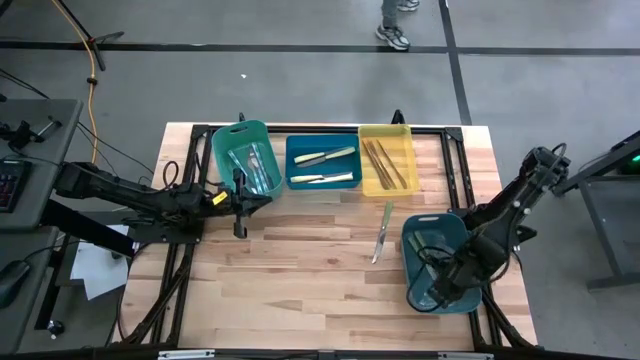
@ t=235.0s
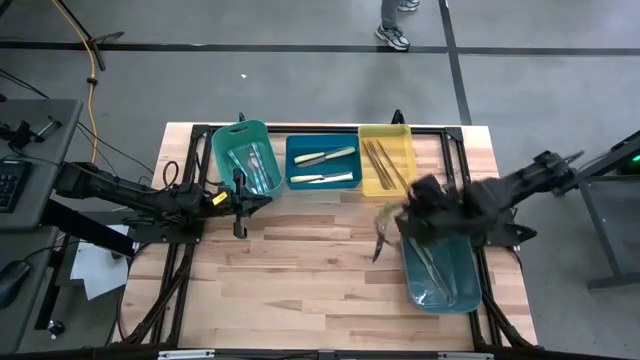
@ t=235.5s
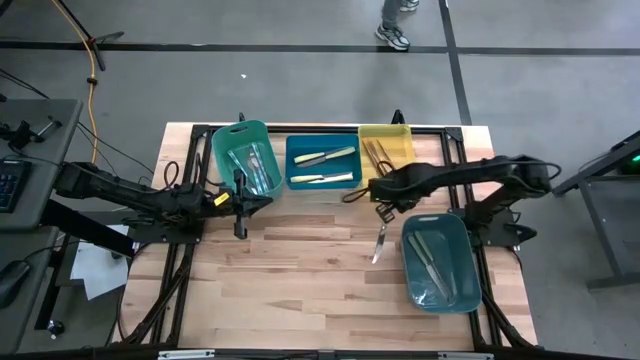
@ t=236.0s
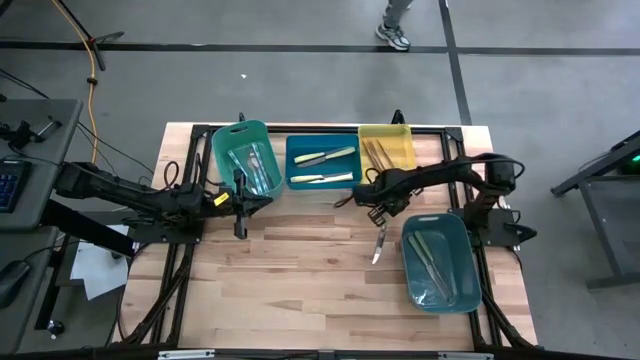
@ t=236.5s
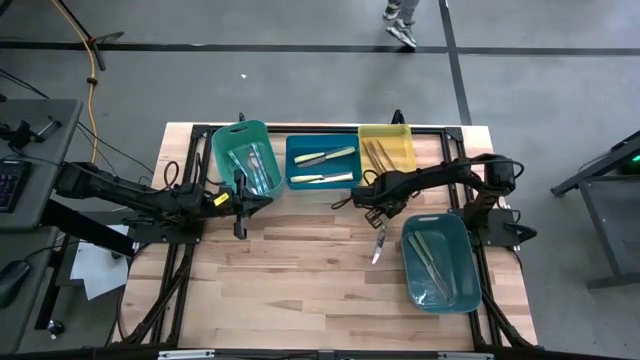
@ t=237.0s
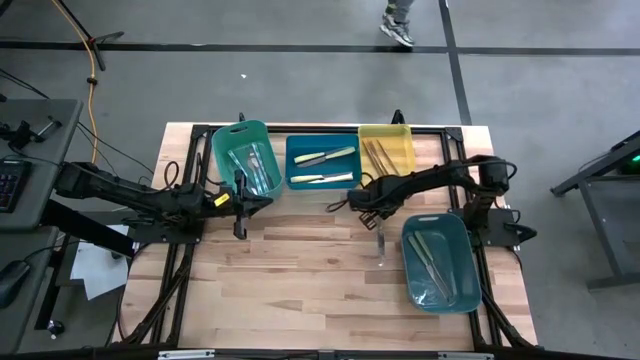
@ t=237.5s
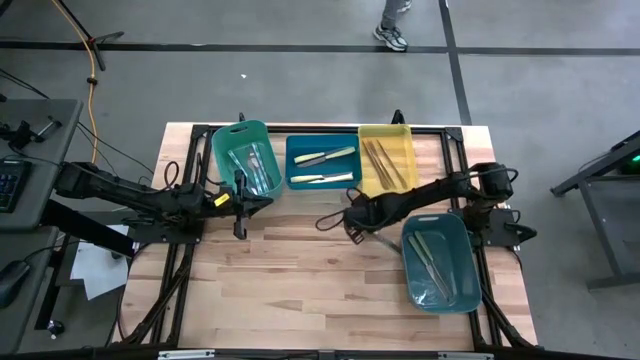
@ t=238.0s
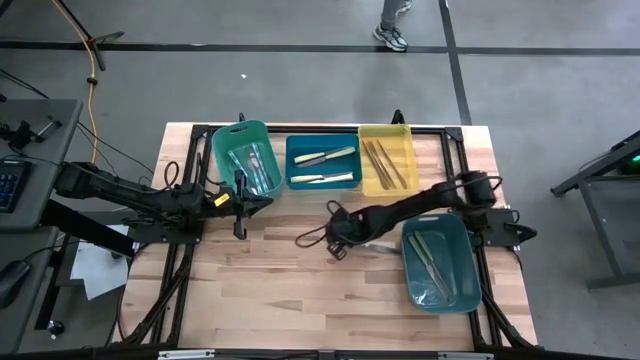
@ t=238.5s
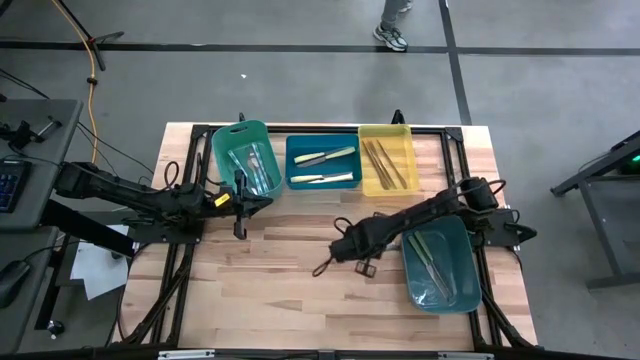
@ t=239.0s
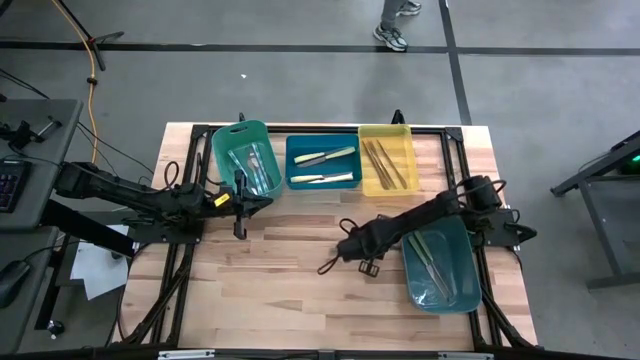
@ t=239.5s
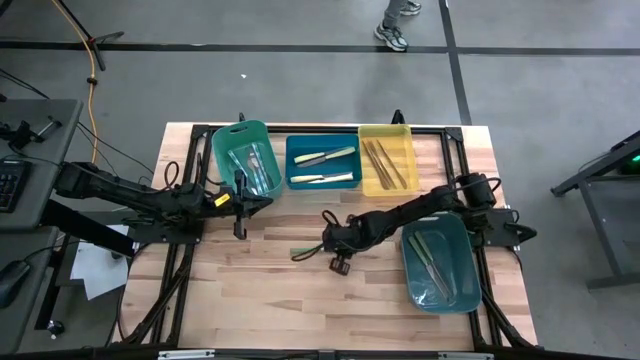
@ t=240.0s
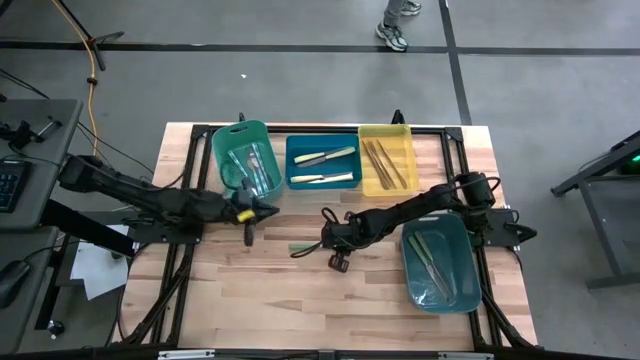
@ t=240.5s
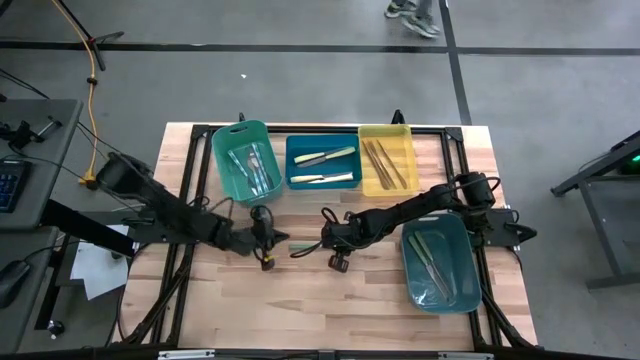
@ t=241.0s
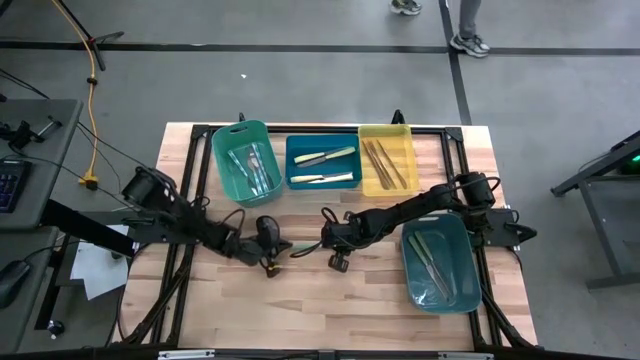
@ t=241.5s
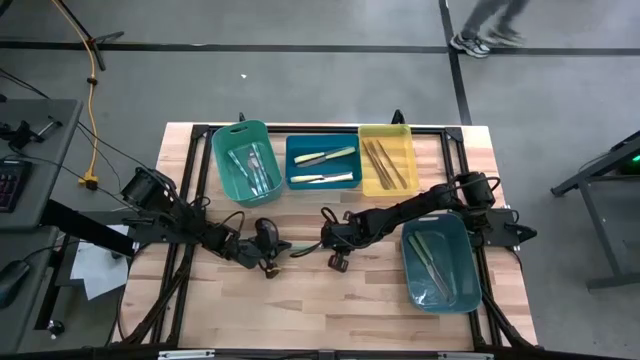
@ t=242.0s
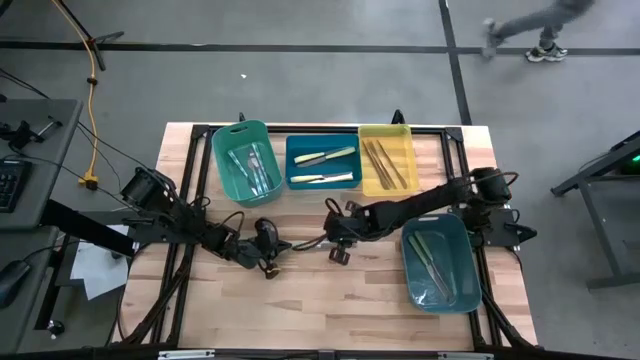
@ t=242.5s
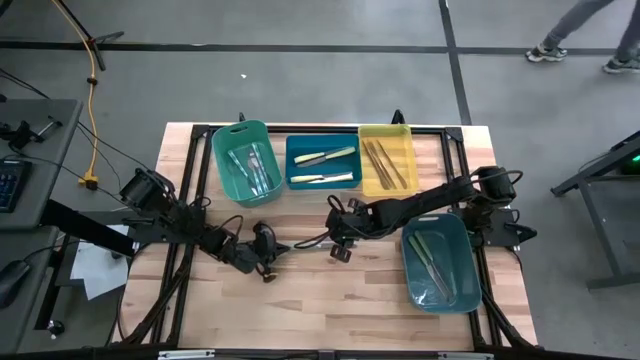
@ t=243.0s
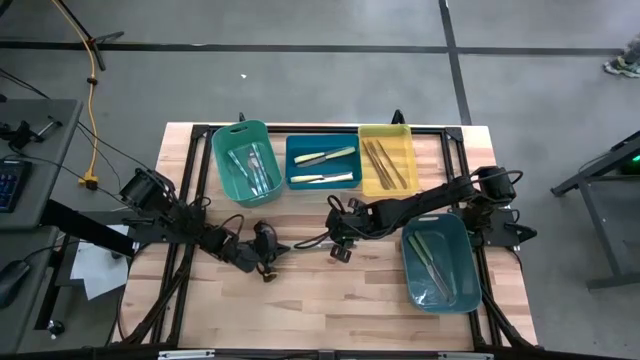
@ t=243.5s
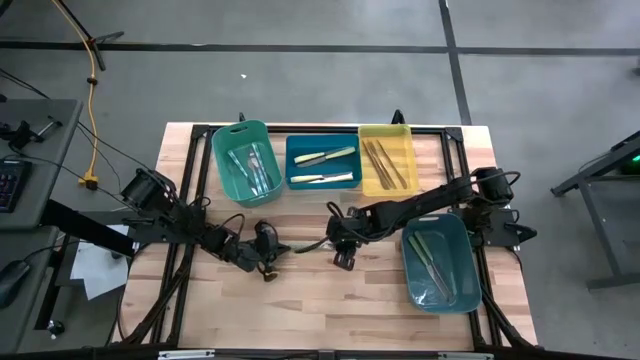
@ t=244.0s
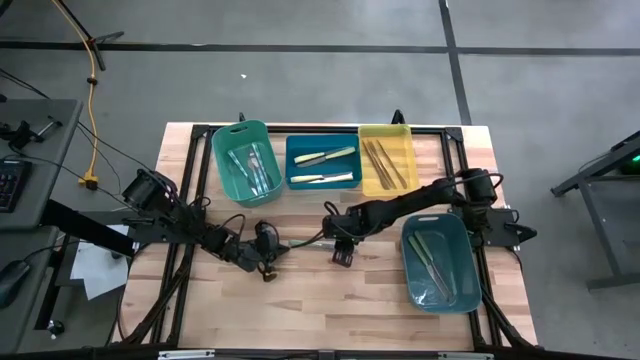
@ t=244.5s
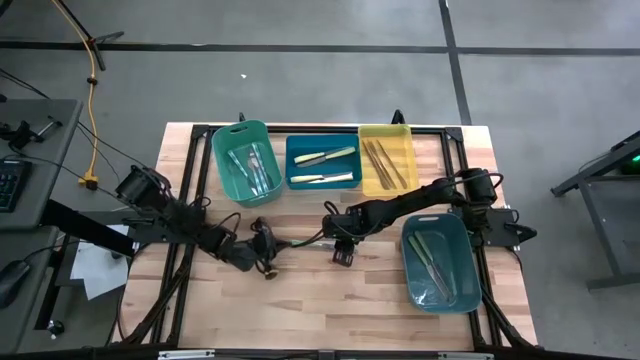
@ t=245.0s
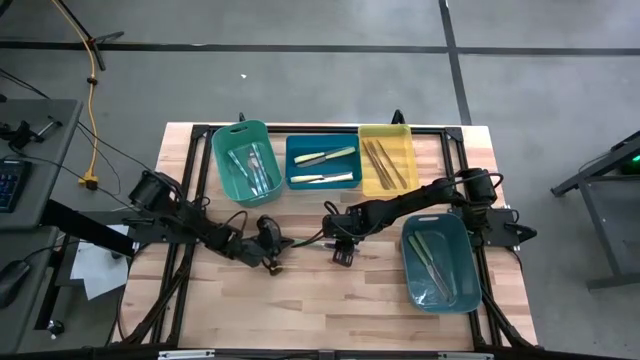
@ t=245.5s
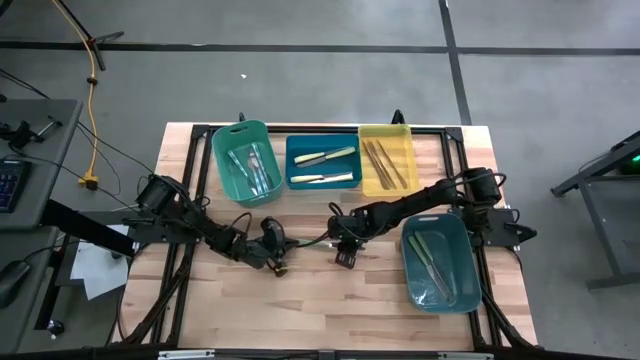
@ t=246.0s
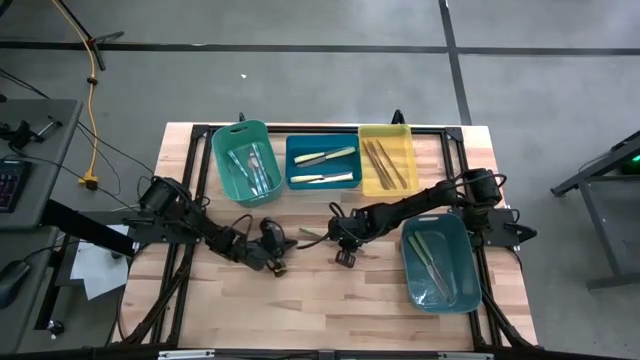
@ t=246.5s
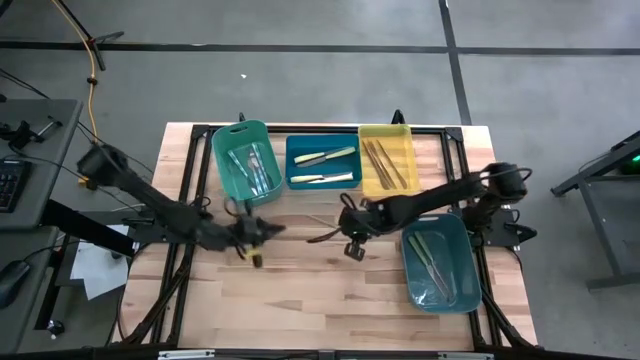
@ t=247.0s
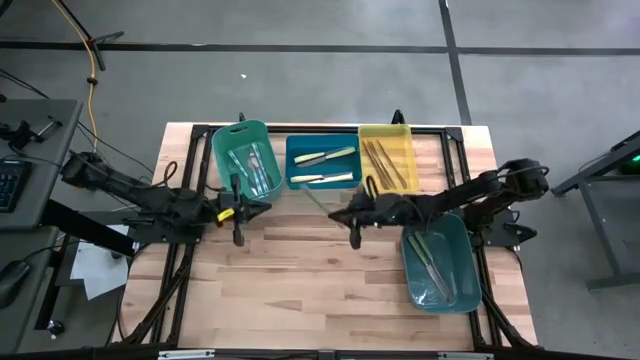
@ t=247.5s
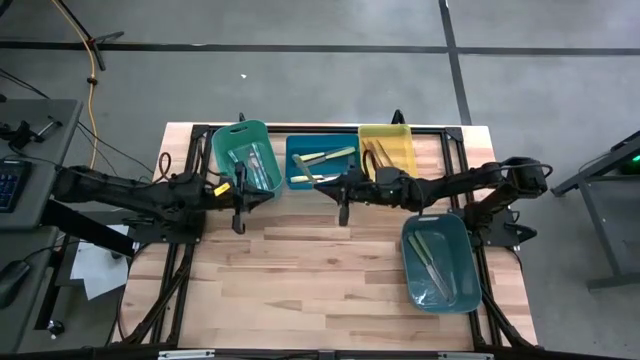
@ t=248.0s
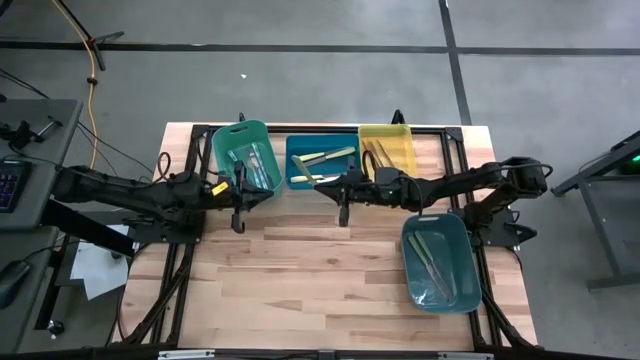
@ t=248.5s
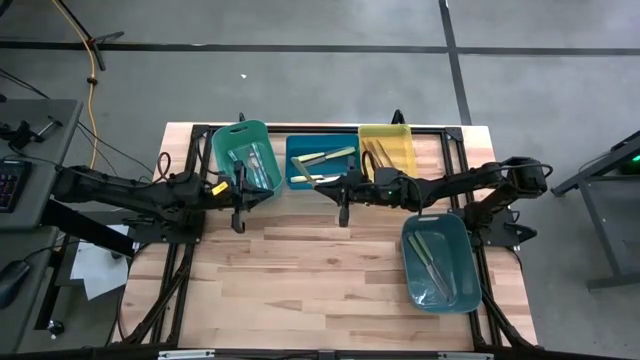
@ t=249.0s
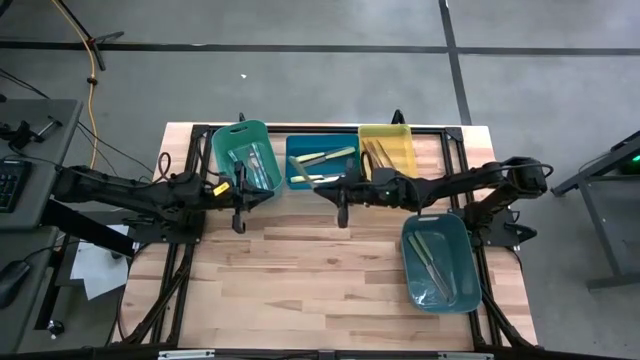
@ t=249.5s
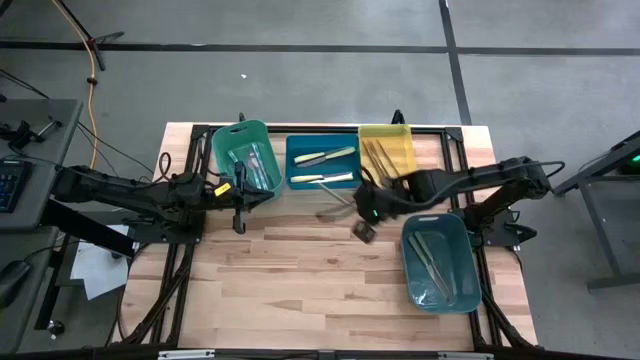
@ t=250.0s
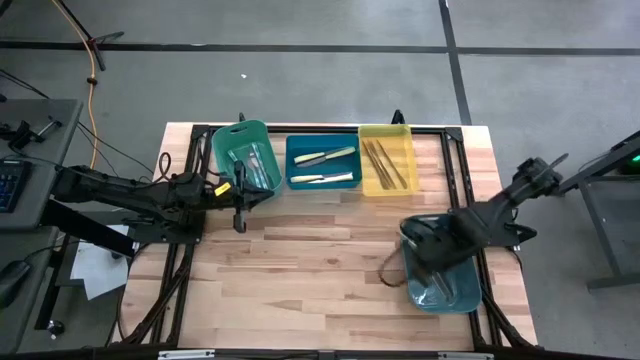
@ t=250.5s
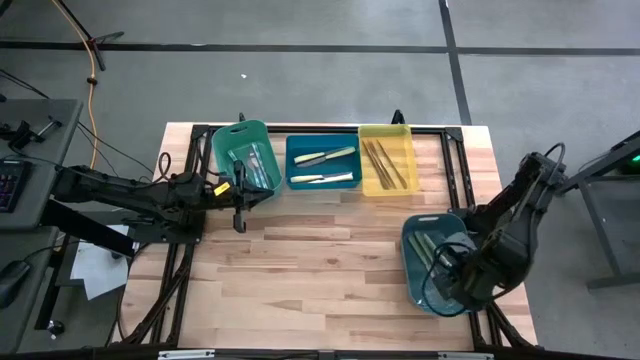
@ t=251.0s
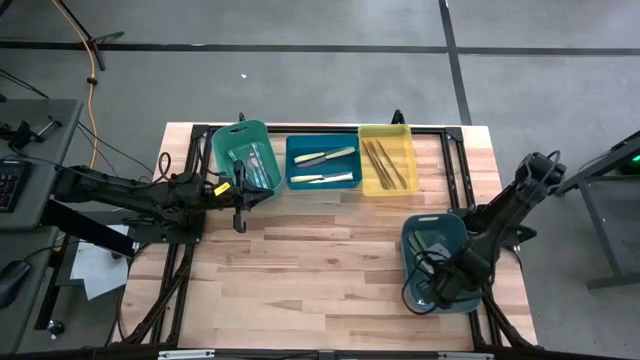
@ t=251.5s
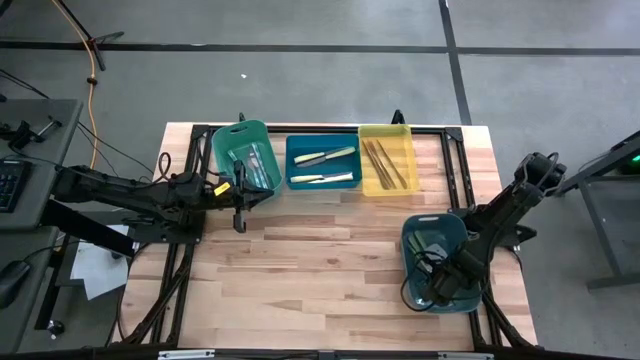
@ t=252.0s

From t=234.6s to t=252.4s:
Task: Sort silverware by color (type)
Put the green knife into the green bin
